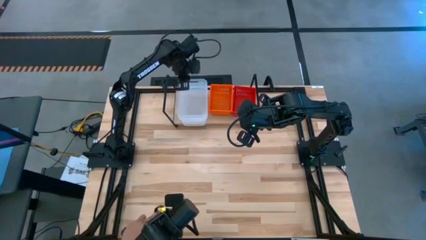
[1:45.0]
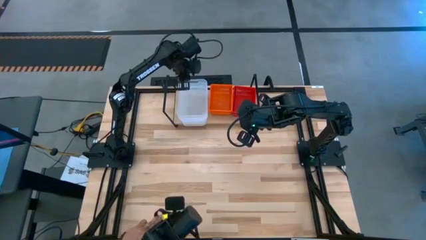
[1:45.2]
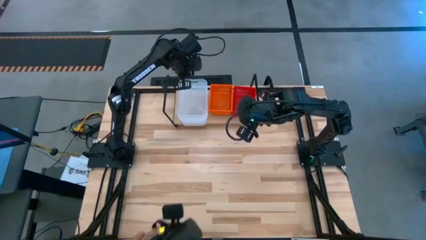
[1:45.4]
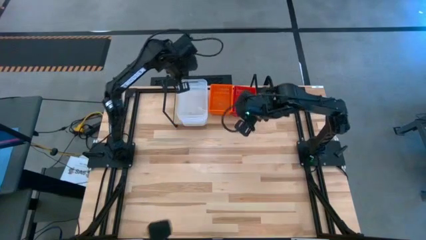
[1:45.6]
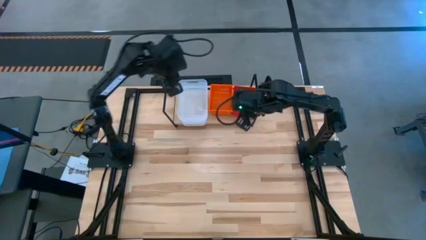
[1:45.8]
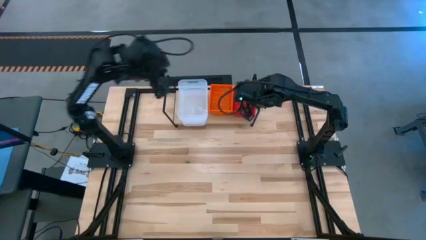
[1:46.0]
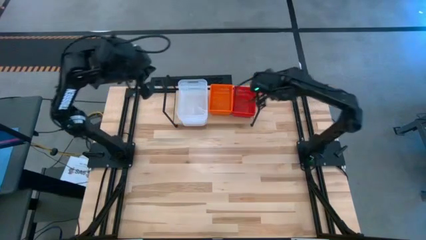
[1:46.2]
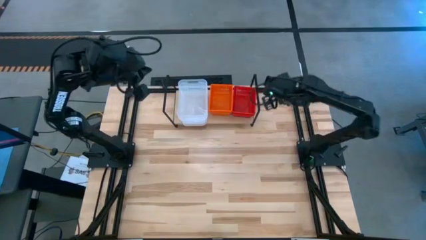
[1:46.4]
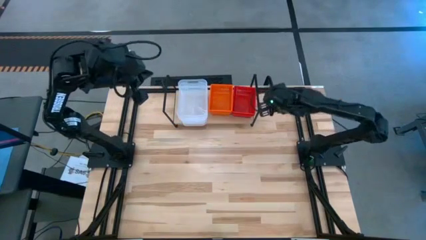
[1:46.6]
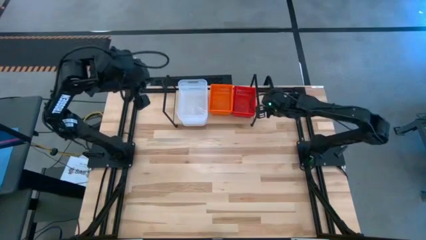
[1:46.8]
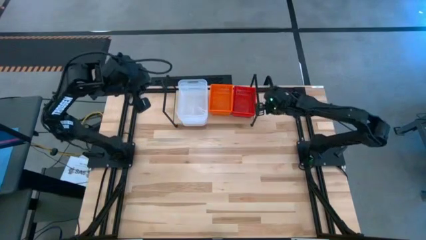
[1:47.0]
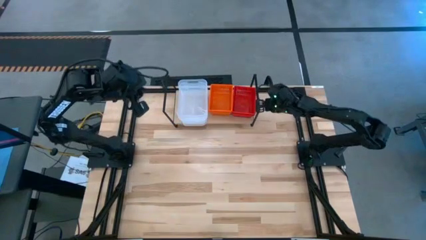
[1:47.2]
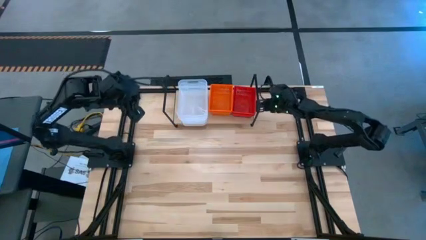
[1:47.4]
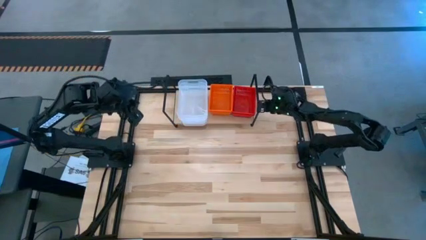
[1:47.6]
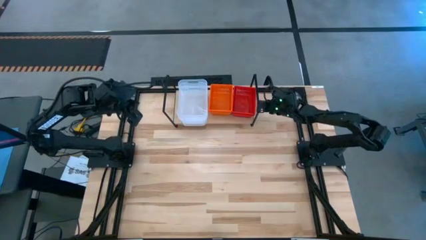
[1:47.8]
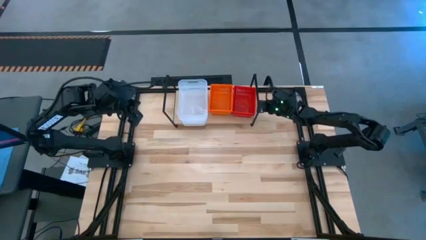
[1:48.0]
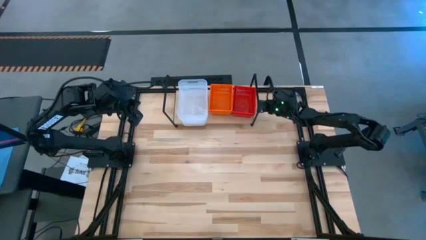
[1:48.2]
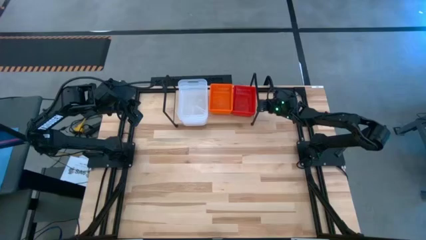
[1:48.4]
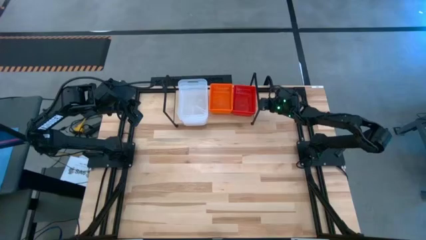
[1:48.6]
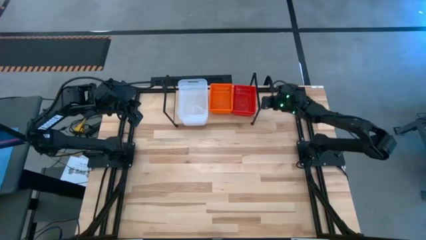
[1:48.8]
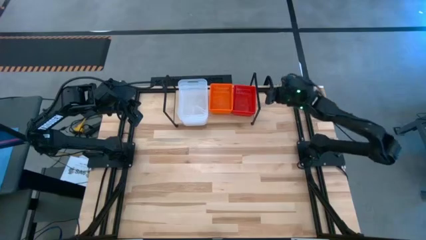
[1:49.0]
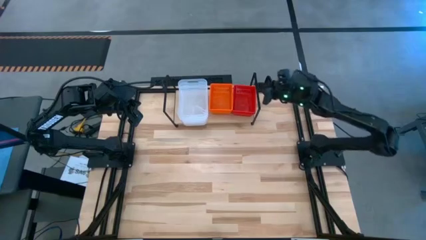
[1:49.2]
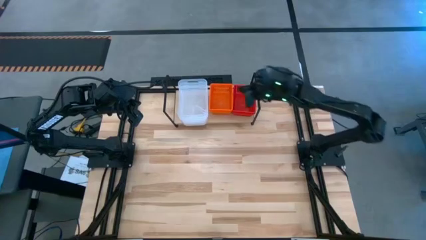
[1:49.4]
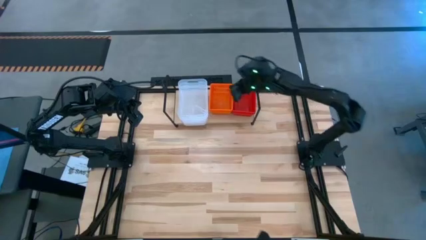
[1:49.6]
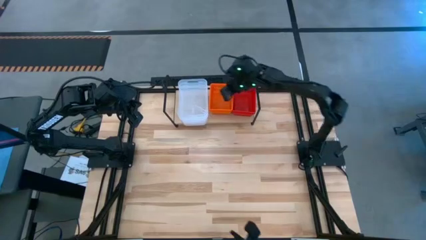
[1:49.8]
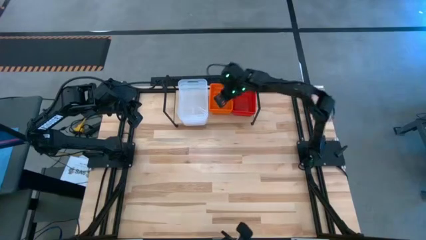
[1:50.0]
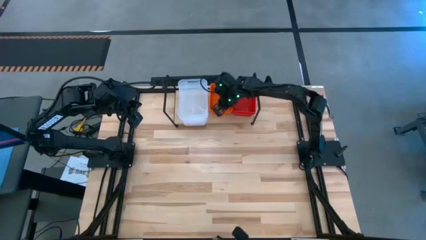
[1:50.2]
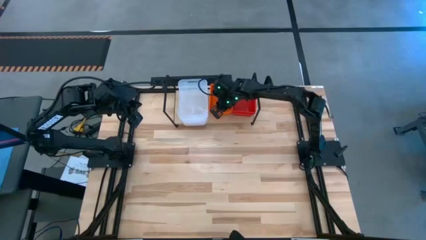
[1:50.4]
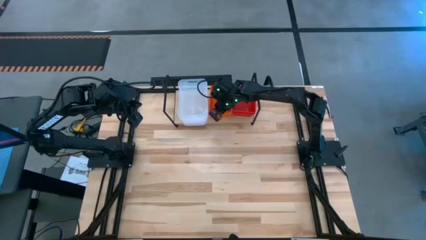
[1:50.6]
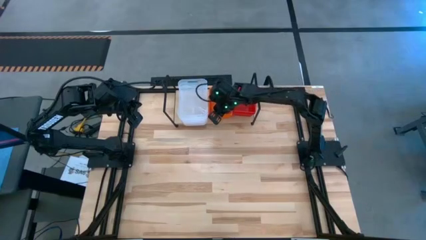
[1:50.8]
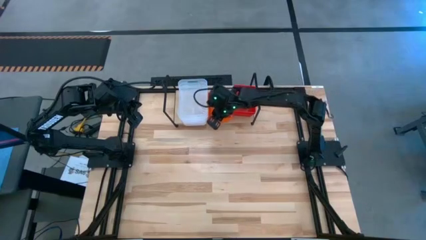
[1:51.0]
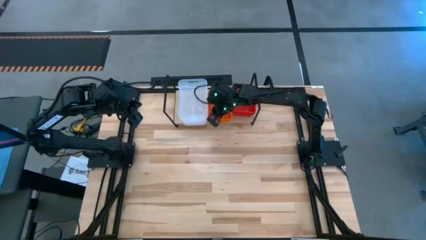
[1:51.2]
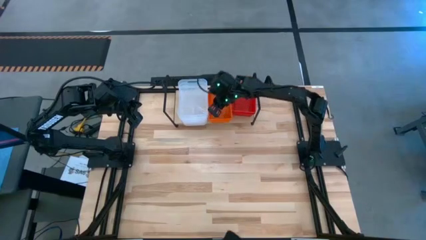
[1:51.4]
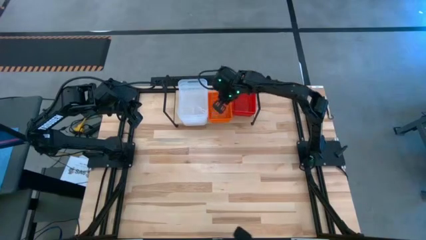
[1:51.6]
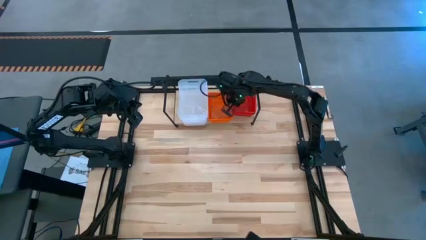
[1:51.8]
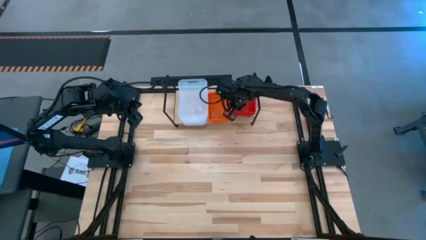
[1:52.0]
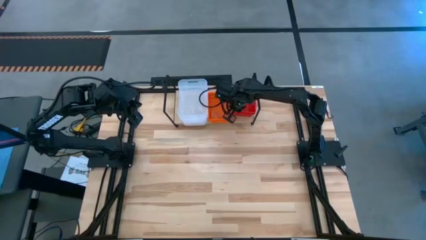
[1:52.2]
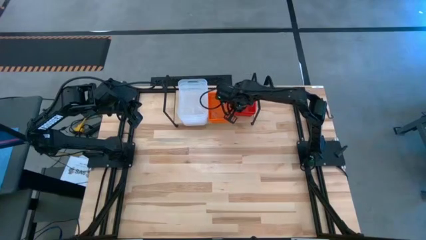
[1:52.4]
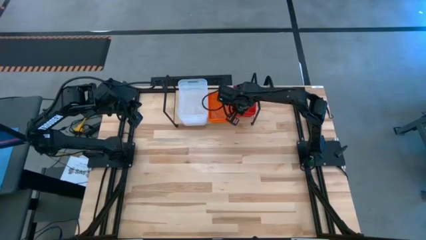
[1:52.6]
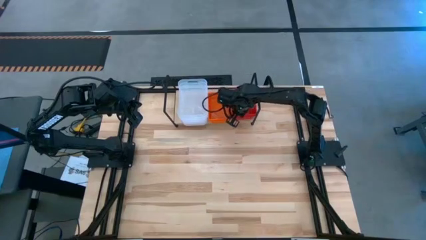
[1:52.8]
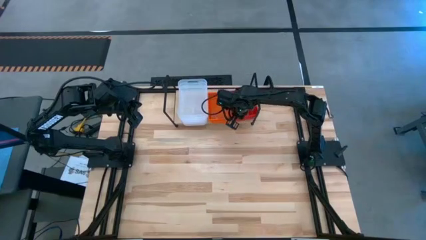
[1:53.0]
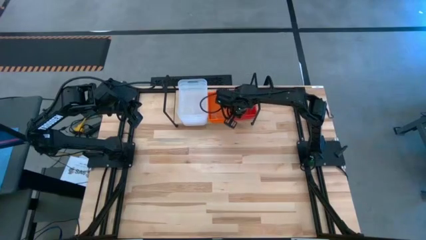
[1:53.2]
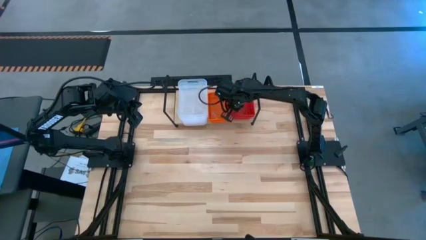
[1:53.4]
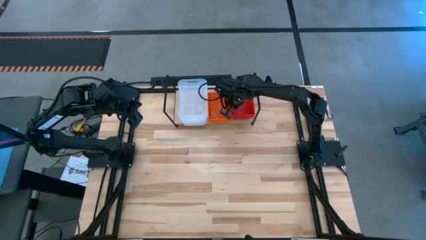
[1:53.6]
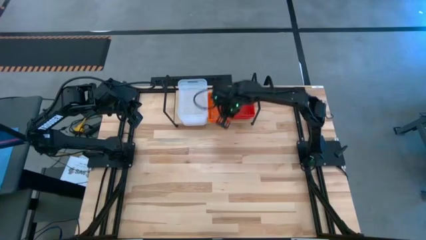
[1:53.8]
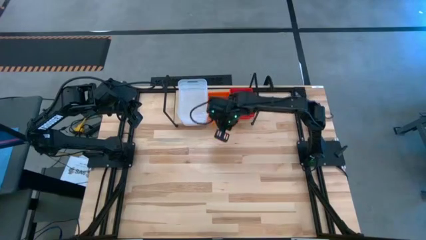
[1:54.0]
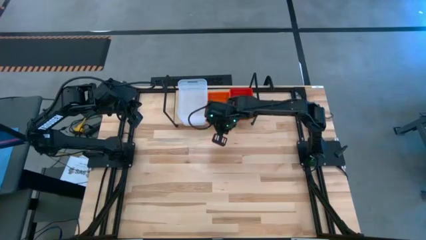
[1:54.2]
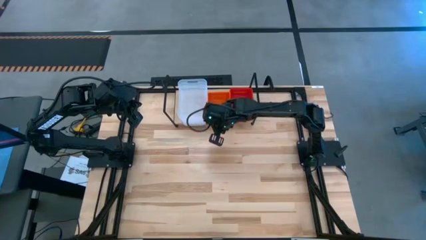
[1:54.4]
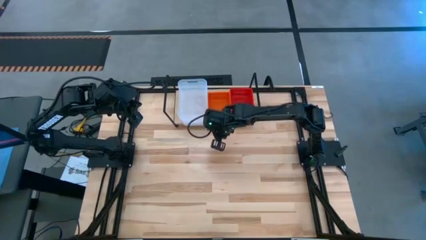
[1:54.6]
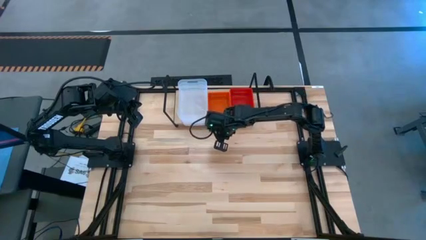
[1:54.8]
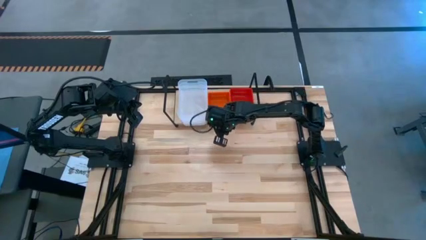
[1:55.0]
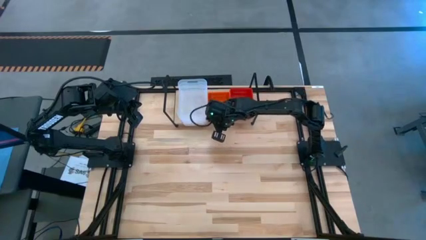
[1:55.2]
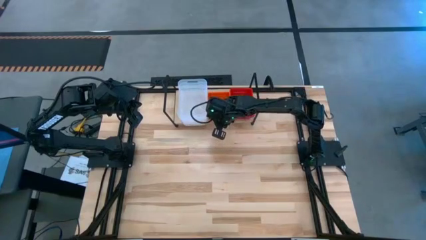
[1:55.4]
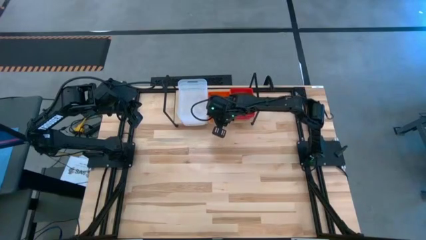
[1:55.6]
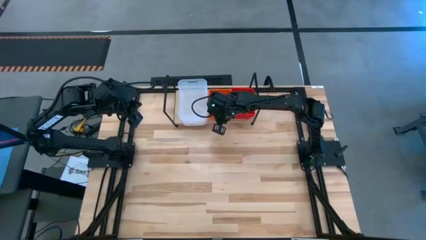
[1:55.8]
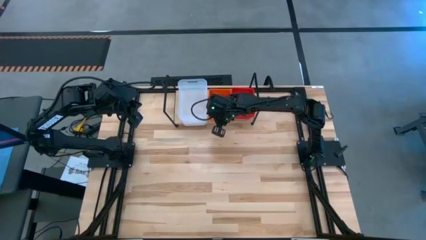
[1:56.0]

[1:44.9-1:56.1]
Task: Stack baskets on shelf by color
Adjust the stacked bins on the shelf

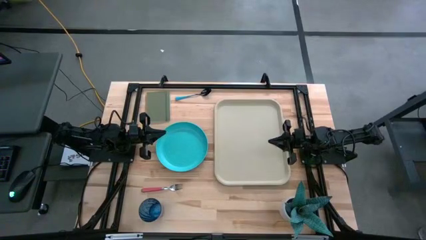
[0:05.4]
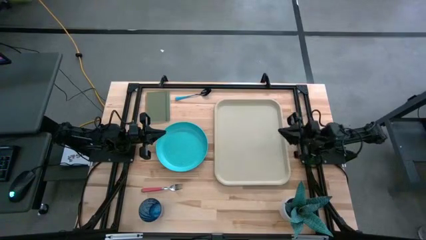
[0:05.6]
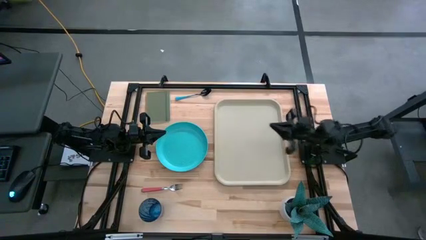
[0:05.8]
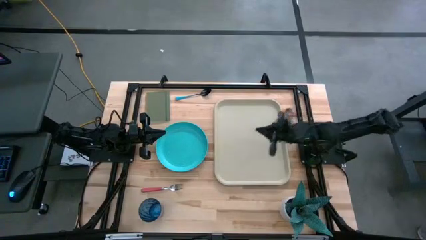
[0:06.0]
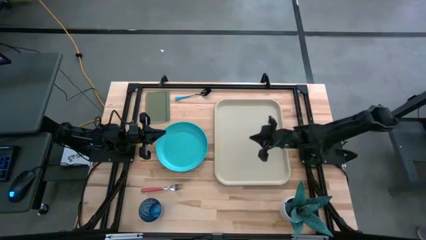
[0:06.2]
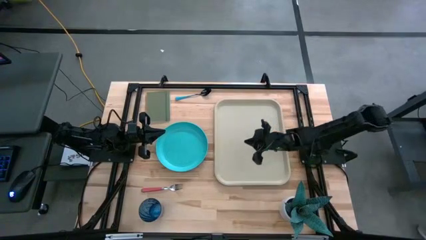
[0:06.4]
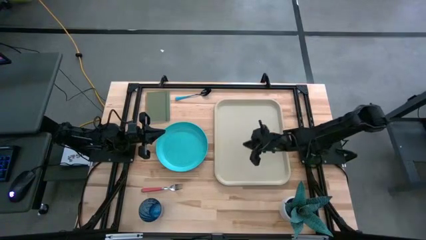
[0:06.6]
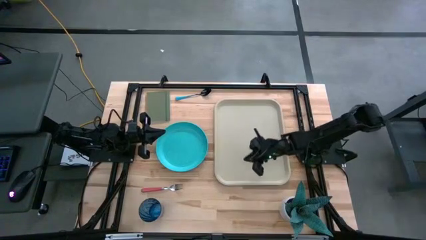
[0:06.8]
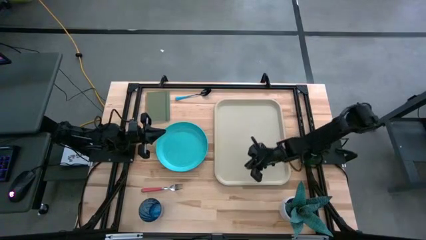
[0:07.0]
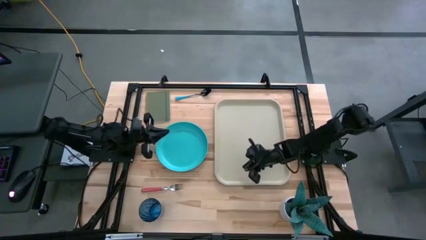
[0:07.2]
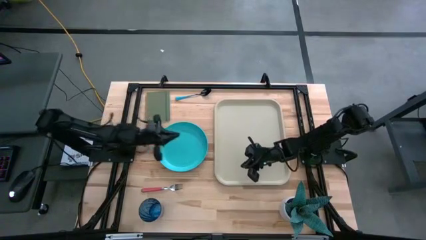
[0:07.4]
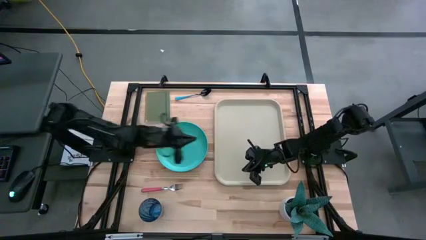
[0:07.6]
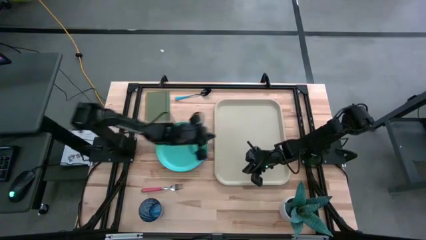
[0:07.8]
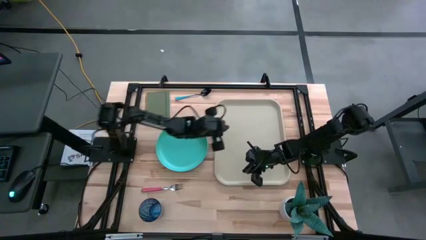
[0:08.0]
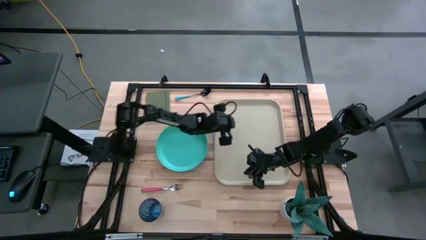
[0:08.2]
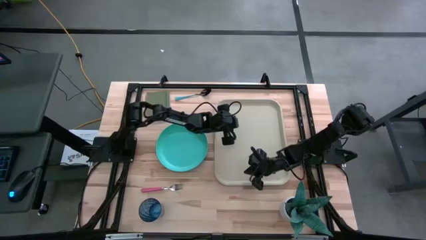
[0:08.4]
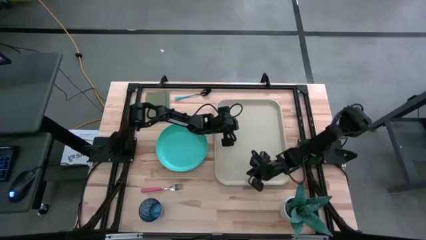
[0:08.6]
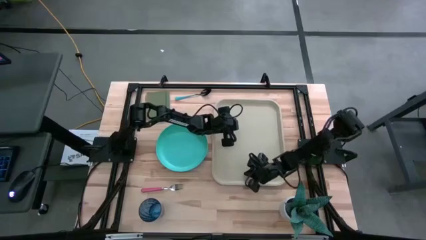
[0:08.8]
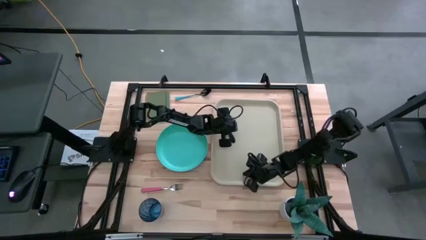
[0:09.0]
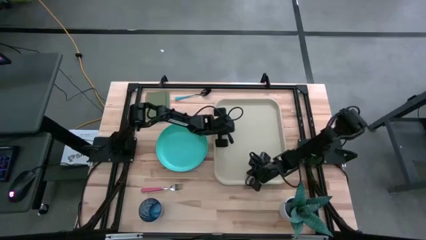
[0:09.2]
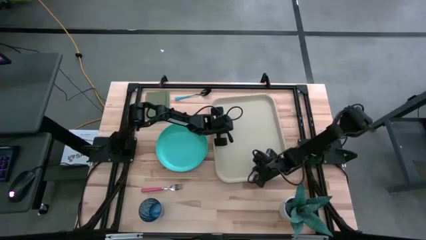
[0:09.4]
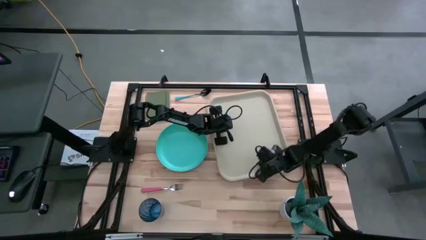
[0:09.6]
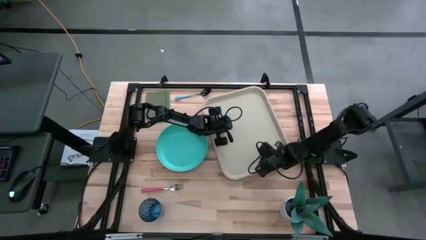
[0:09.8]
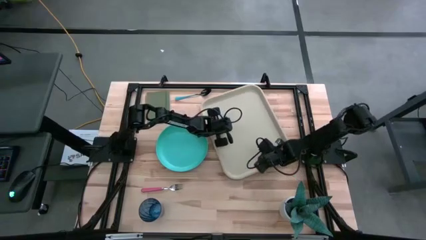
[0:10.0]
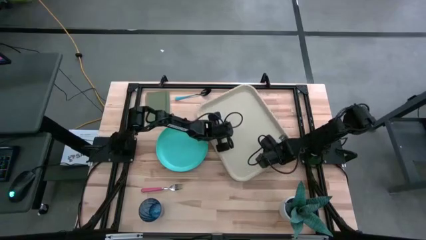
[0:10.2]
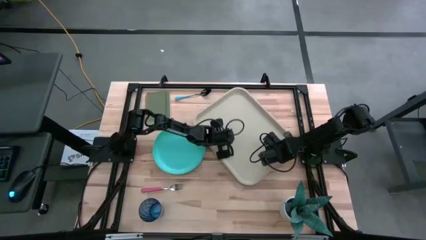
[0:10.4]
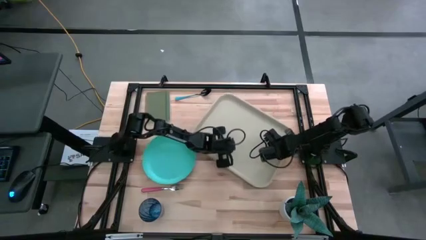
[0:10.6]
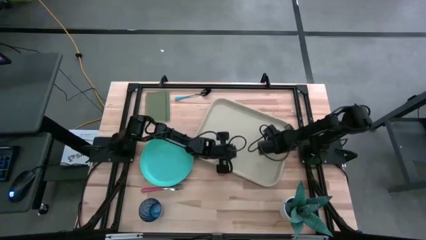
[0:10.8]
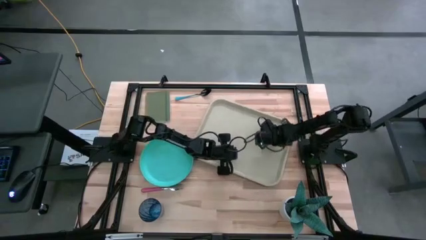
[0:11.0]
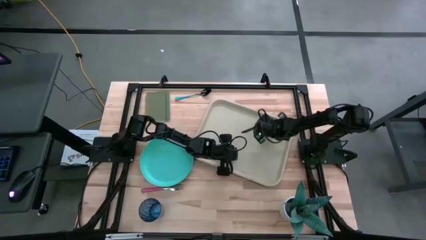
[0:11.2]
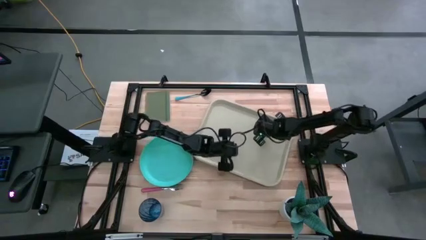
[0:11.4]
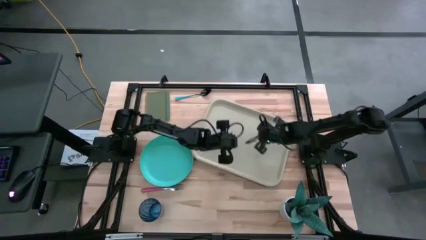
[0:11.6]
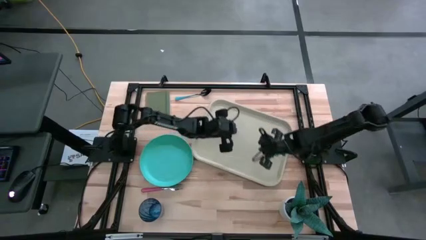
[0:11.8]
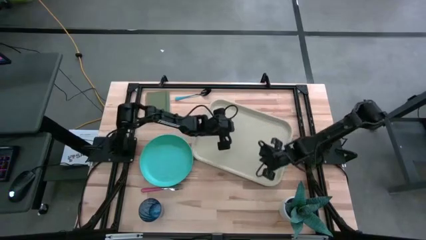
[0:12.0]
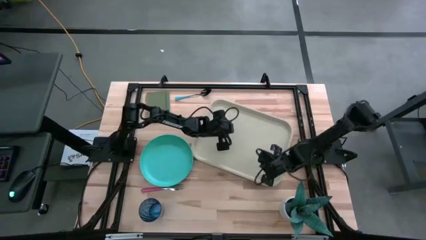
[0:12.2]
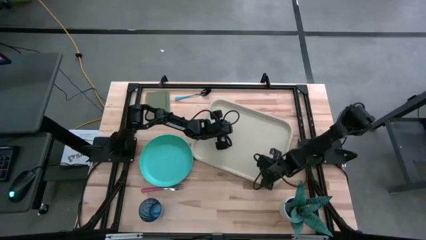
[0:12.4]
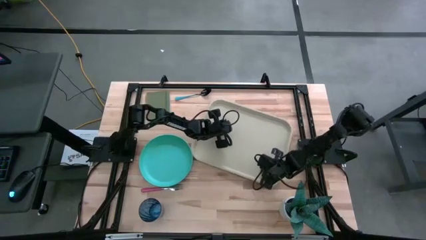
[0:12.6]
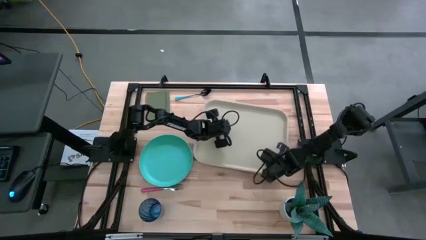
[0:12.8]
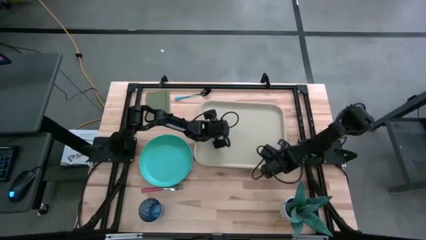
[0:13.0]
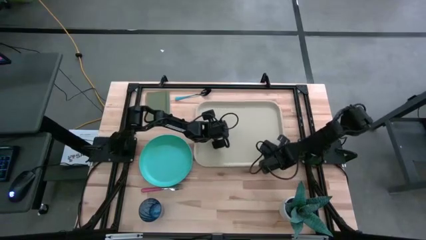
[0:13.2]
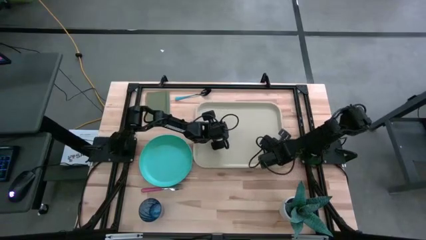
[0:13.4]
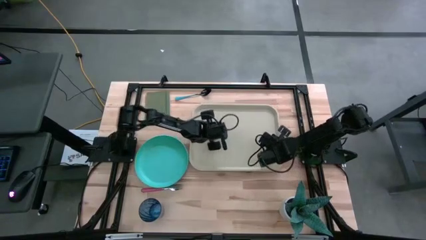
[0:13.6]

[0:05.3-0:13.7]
Task: Pick and place plate/cup/fork/spoon on tray
Adjust the gray serving tray
